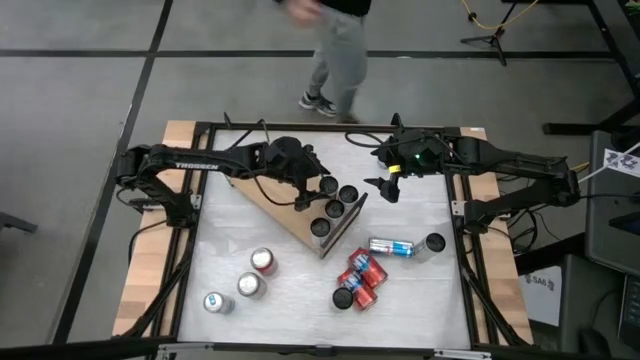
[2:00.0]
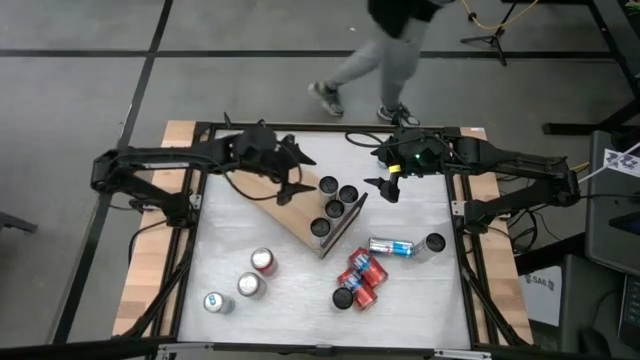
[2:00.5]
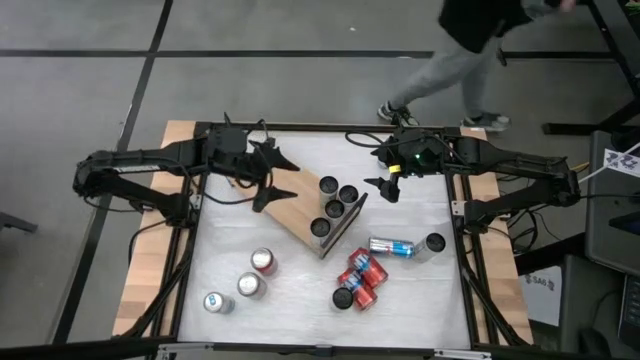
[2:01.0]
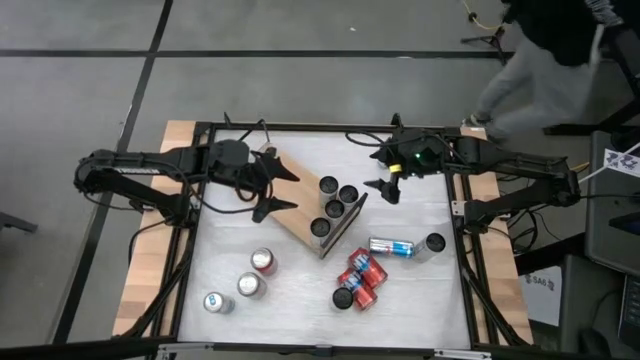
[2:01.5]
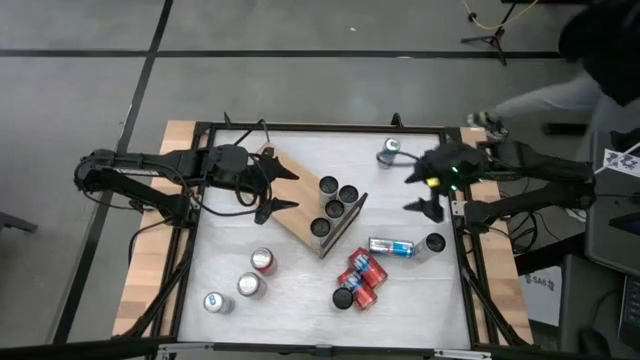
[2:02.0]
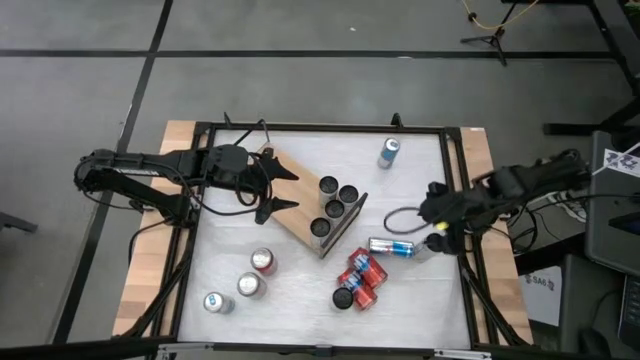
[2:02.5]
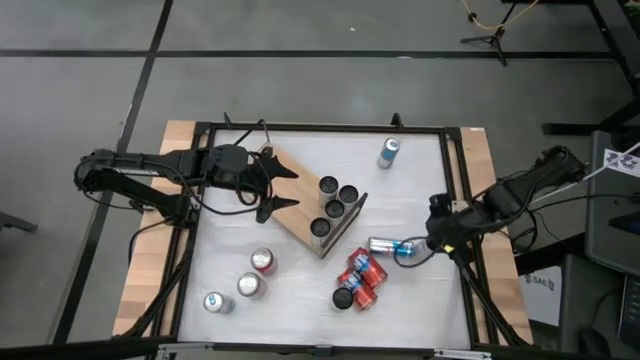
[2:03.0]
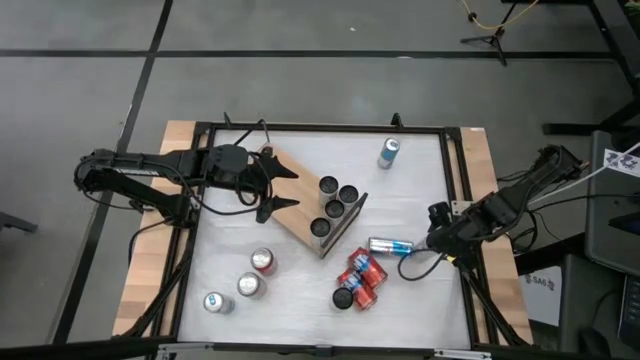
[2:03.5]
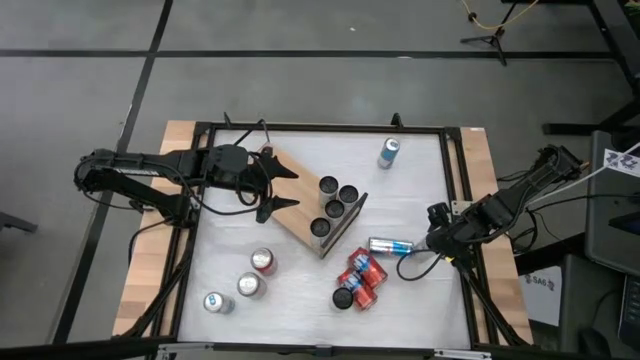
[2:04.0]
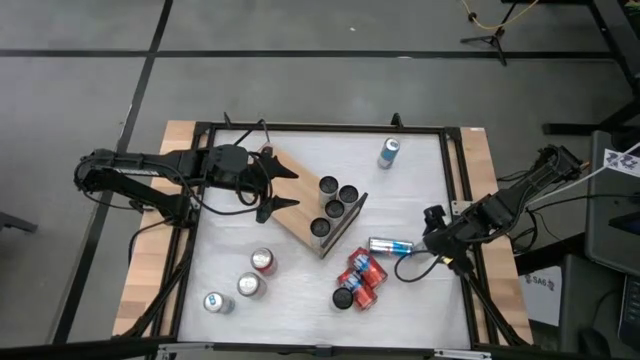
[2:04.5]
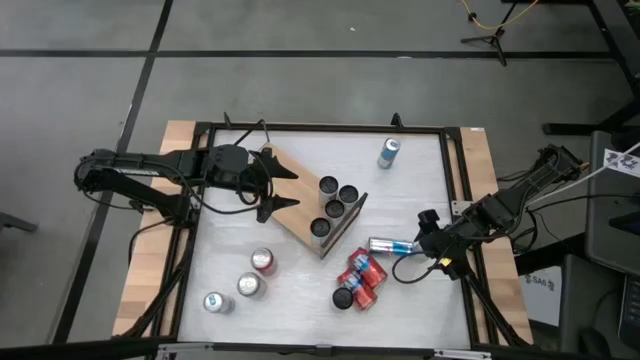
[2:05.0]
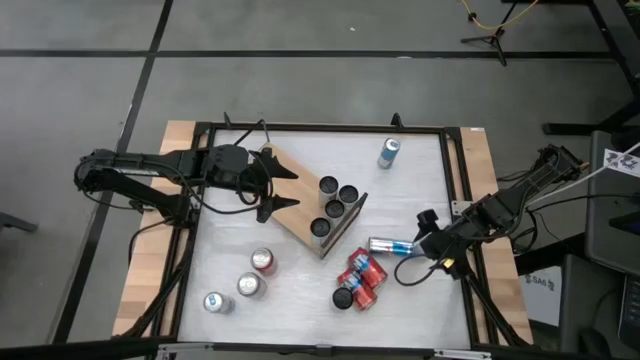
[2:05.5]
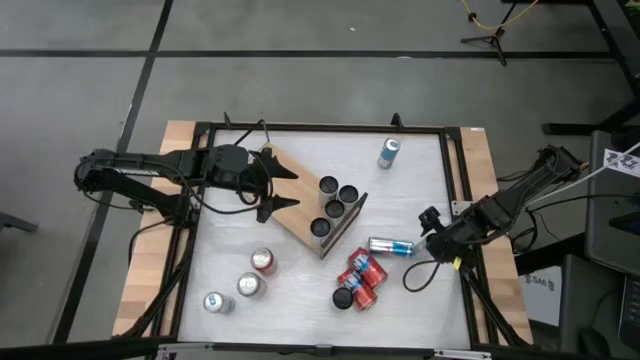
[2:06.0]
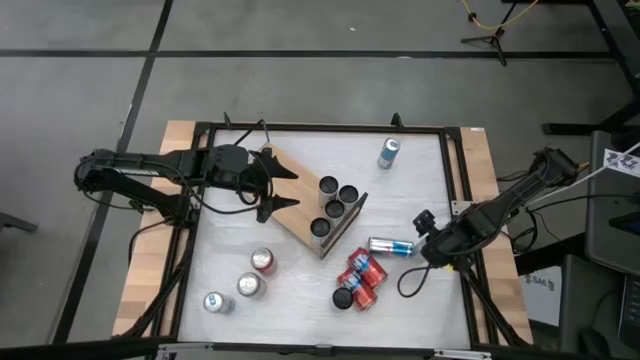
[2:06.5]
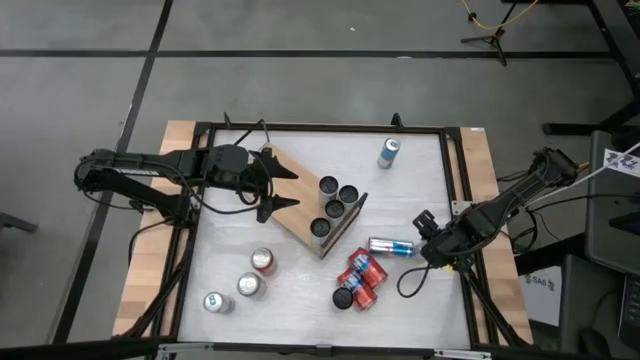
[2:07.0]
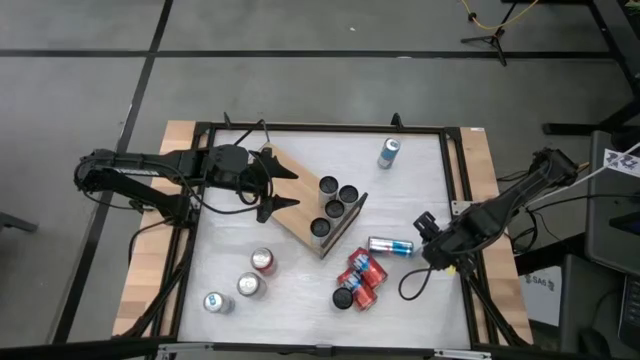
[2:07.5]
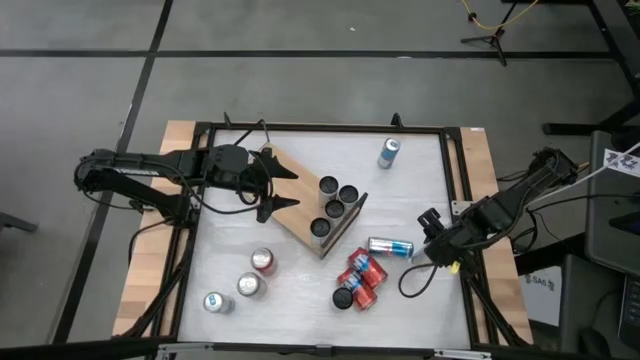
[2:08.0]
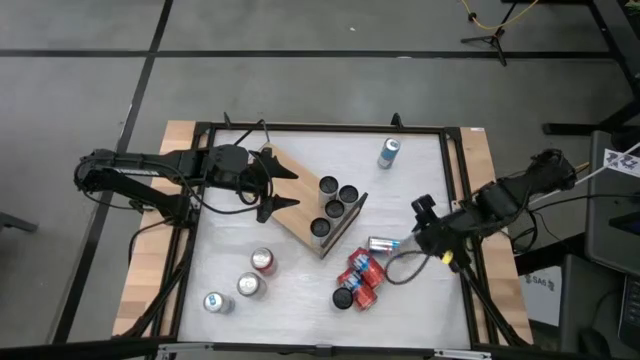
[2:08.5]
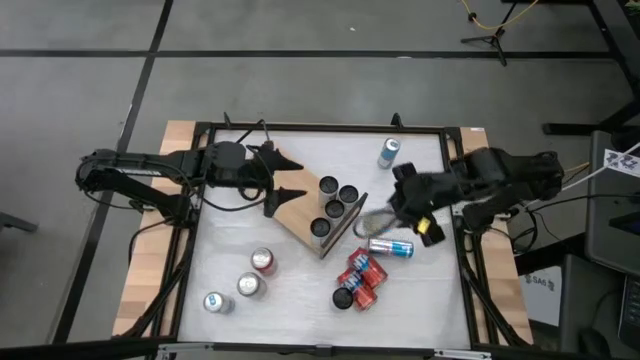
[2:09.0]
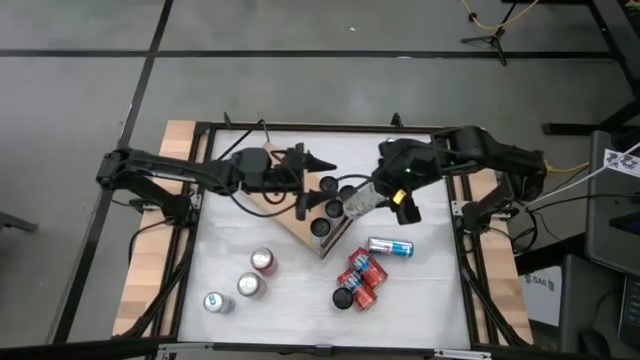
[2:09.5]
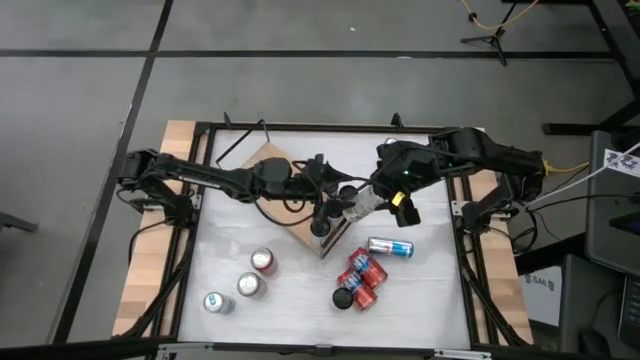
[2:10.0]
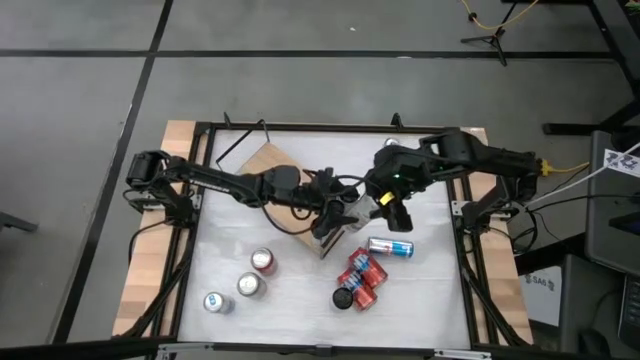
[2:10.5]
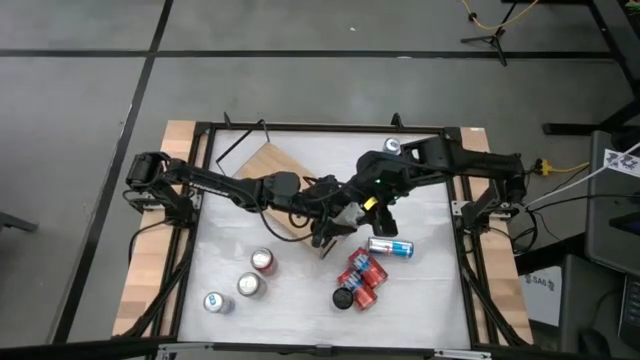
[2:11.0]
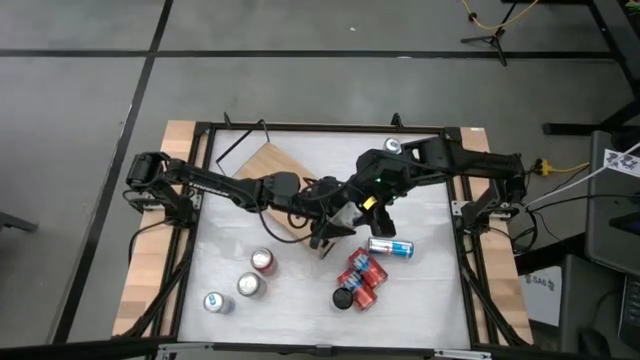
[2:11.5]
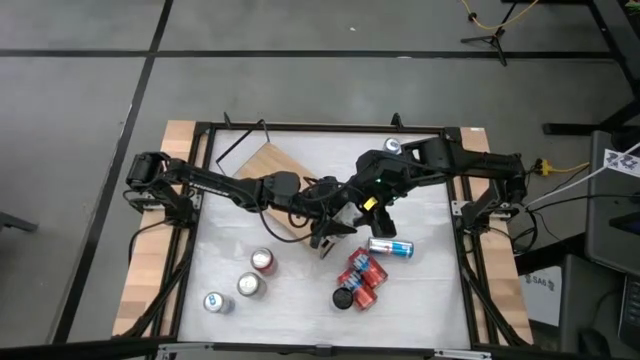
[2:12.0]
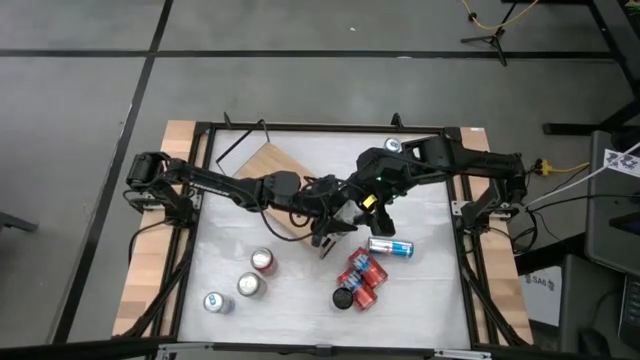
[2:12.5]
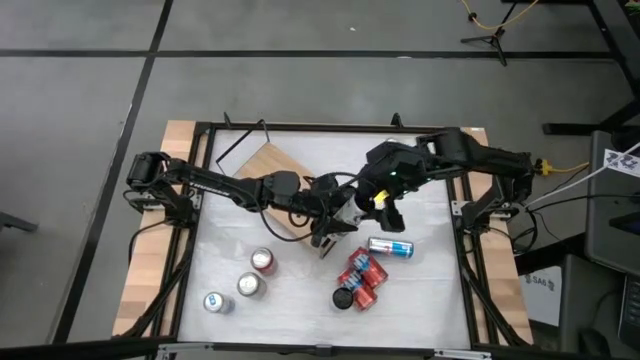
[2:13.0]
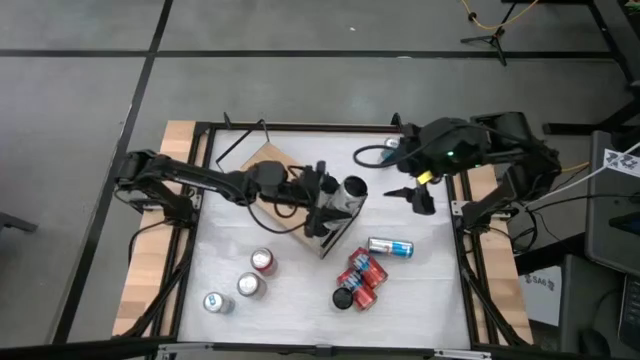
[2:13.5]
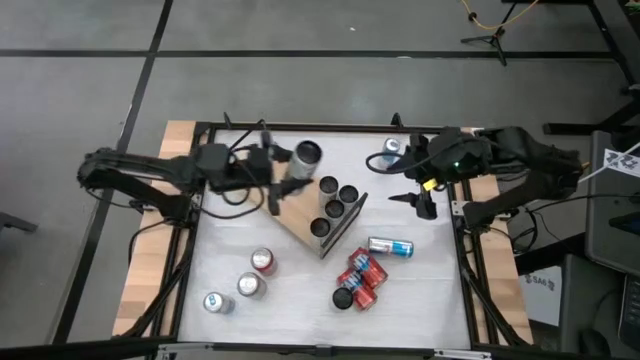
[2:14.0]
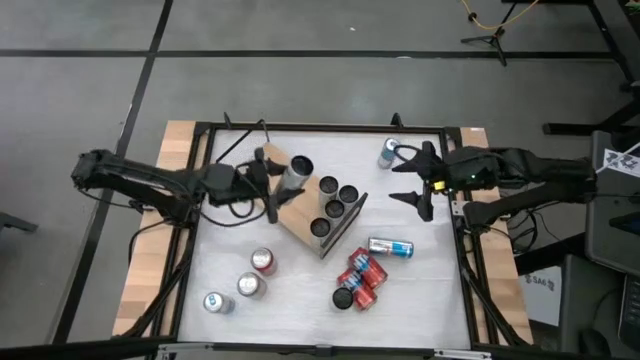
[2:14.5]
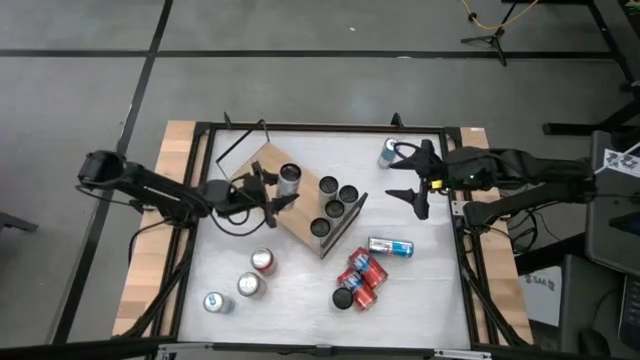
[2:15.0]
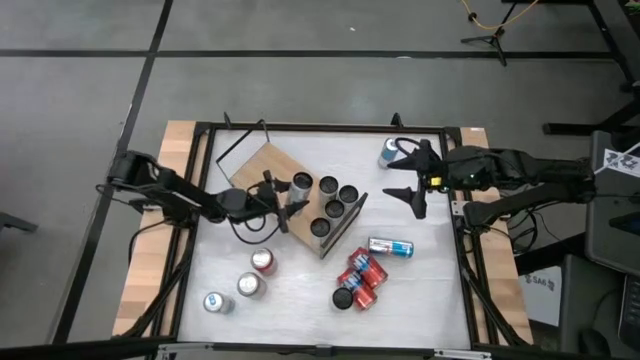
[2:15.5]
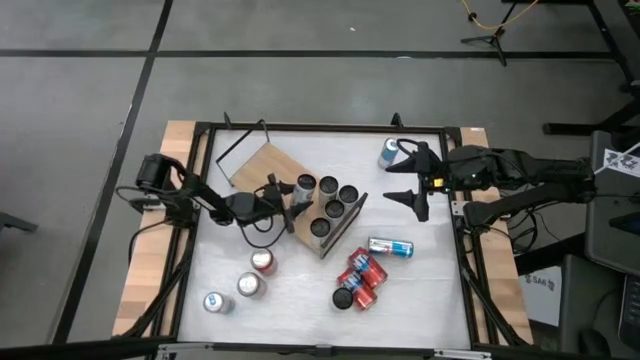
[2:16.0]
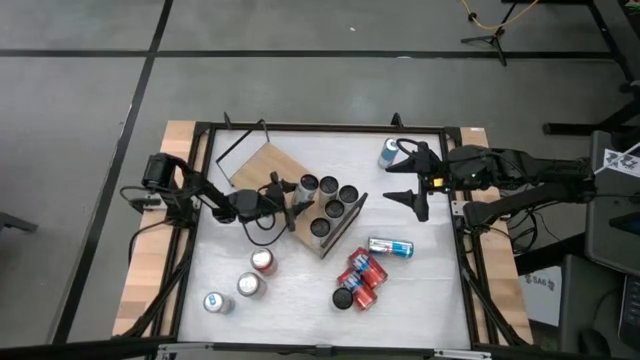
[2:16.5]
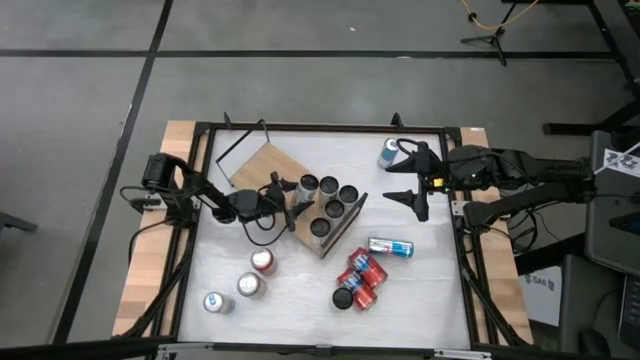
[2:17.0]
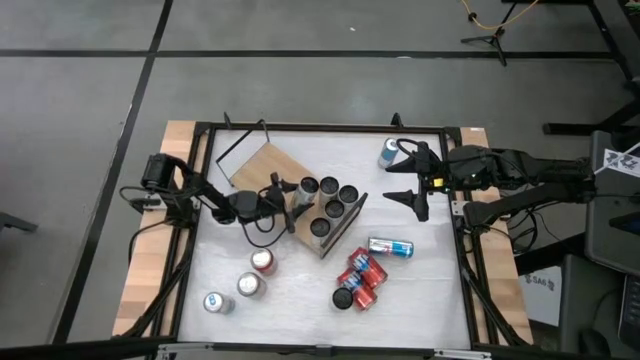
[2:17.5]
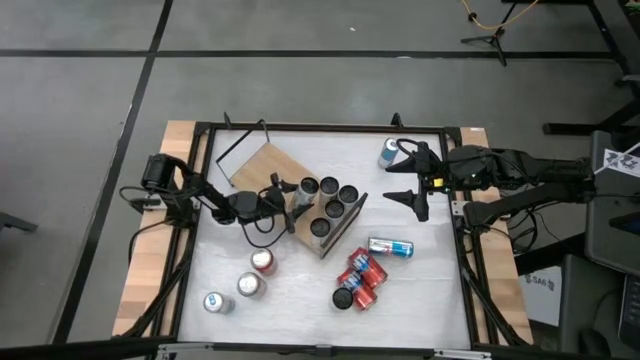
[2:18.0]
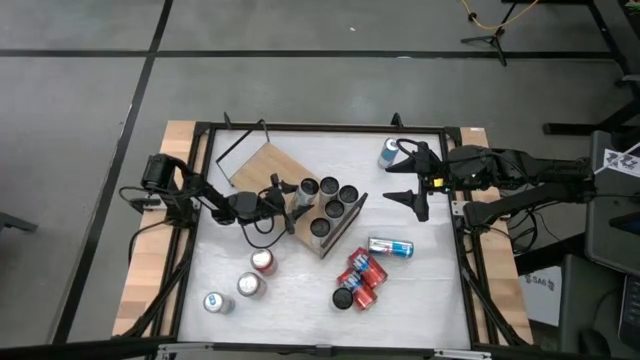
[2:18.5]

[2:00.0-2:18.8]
Task: Place canned beverage on shelf
Put the top white-yellow soda can on the shelf aligned with the other white-yellow soda can
